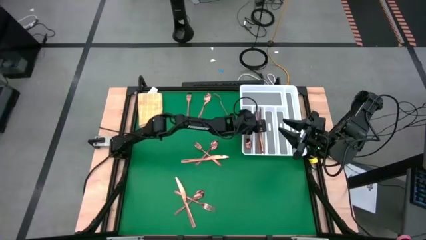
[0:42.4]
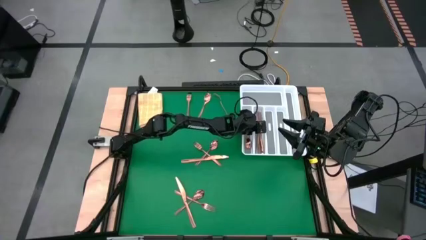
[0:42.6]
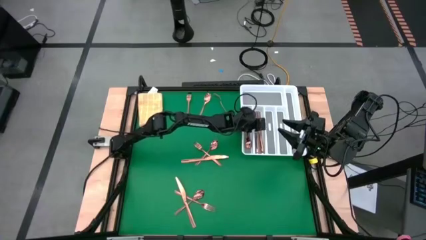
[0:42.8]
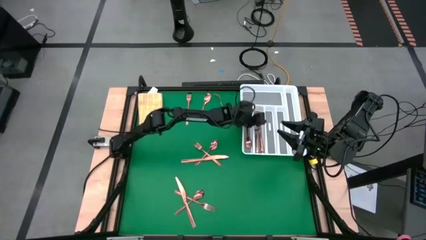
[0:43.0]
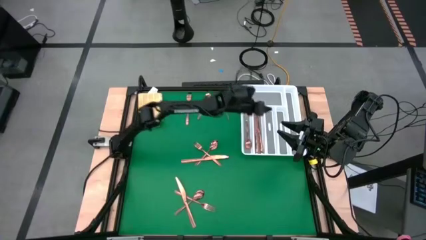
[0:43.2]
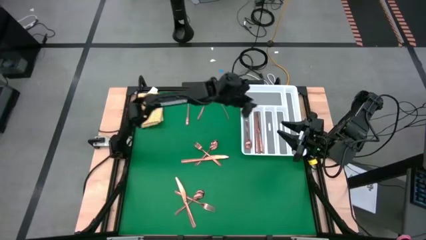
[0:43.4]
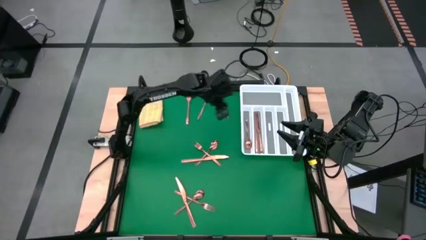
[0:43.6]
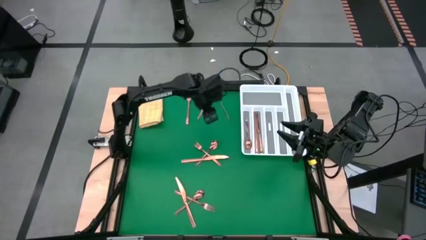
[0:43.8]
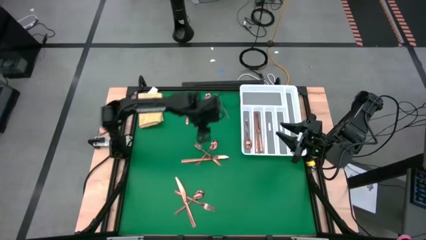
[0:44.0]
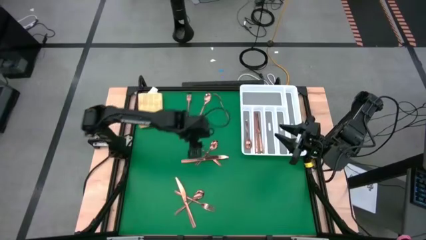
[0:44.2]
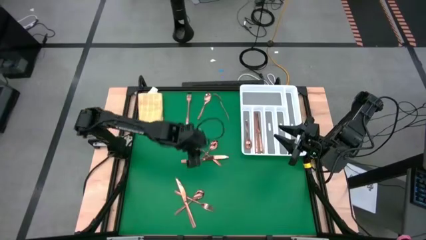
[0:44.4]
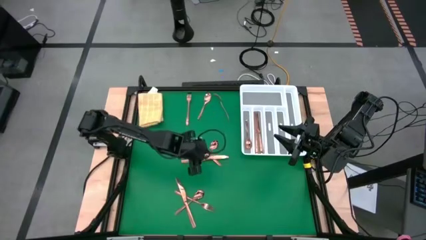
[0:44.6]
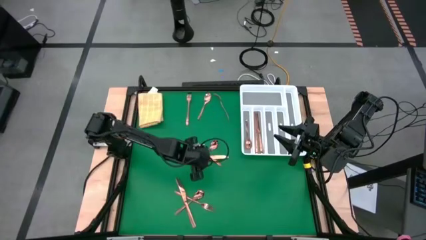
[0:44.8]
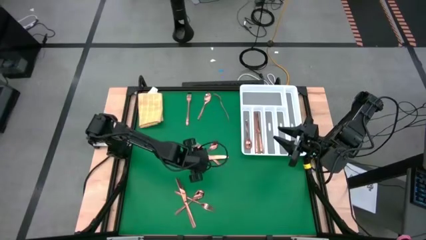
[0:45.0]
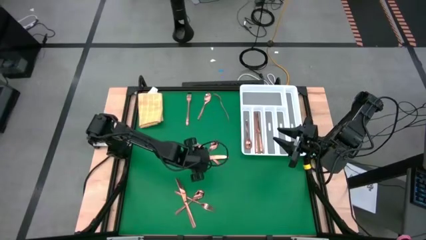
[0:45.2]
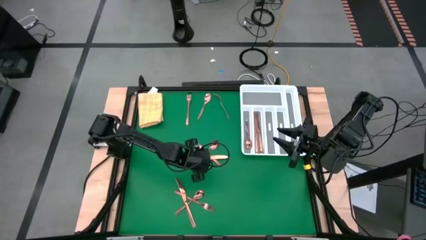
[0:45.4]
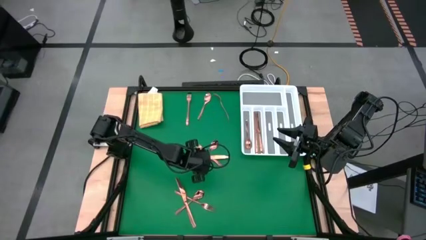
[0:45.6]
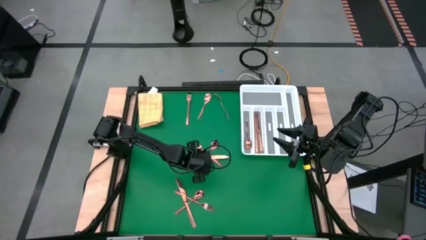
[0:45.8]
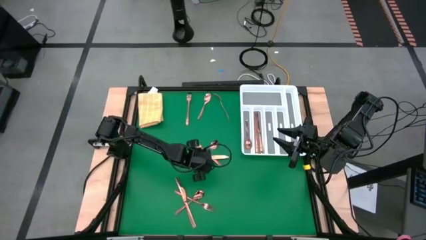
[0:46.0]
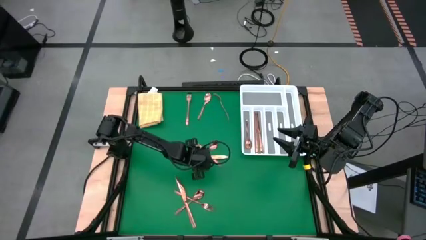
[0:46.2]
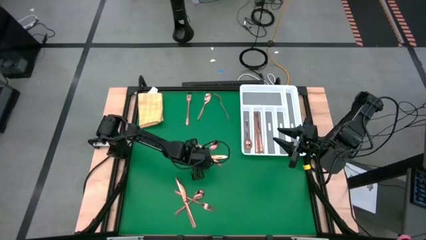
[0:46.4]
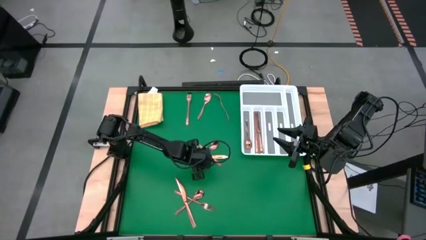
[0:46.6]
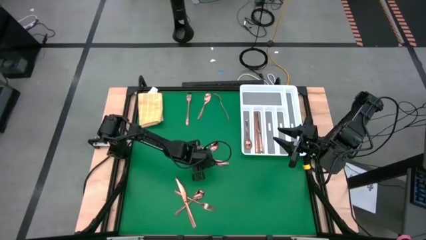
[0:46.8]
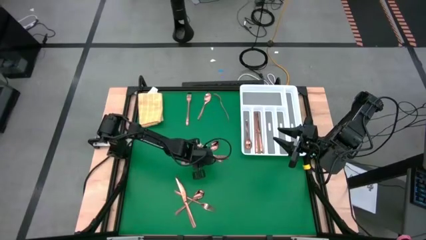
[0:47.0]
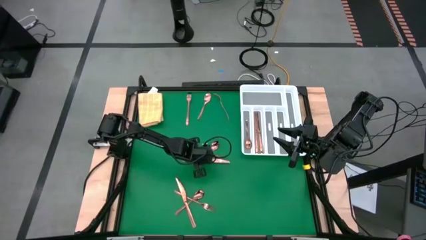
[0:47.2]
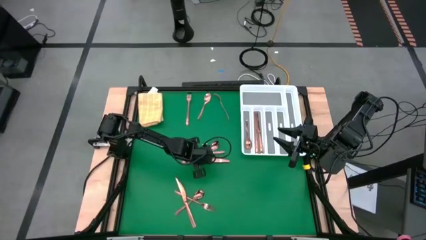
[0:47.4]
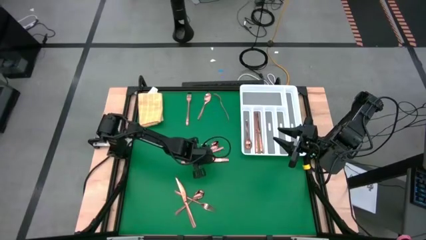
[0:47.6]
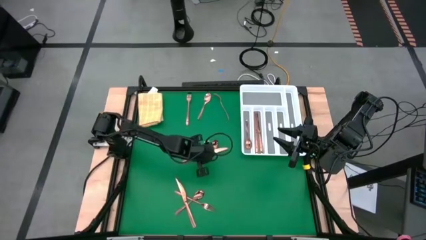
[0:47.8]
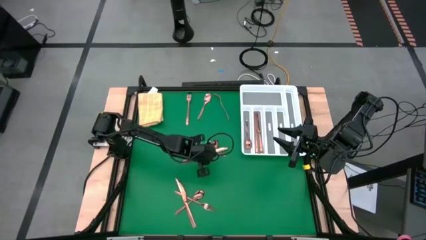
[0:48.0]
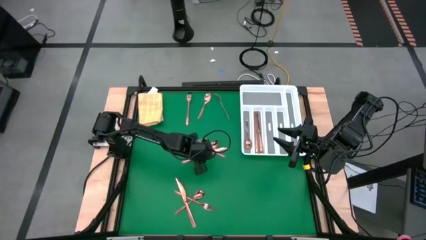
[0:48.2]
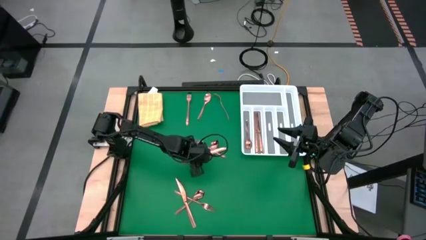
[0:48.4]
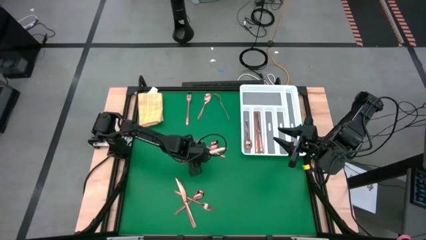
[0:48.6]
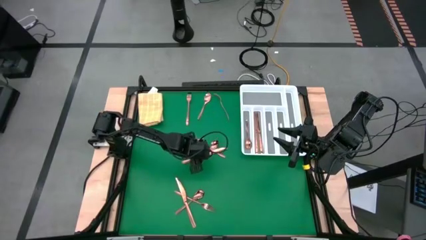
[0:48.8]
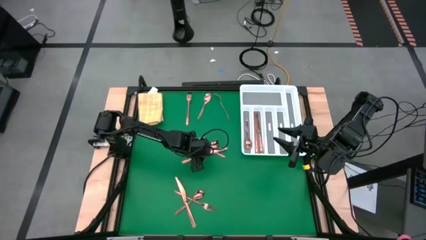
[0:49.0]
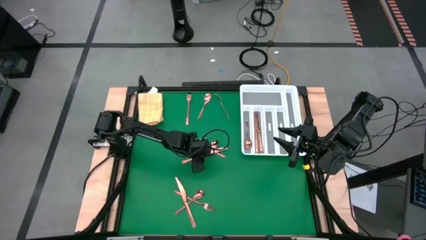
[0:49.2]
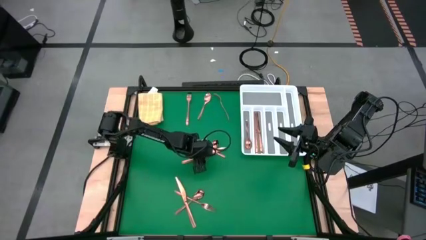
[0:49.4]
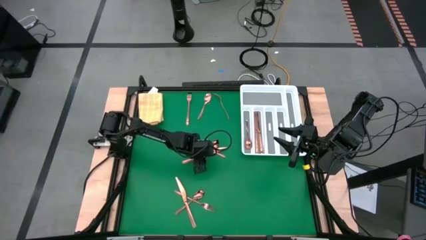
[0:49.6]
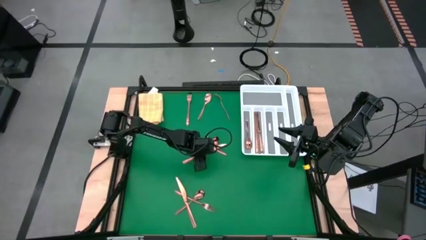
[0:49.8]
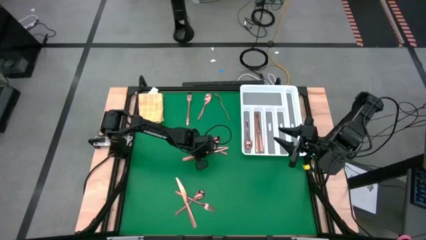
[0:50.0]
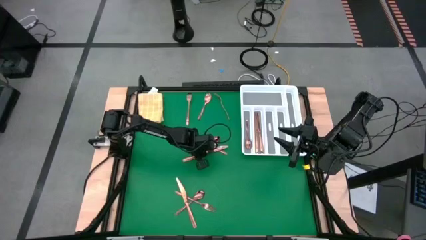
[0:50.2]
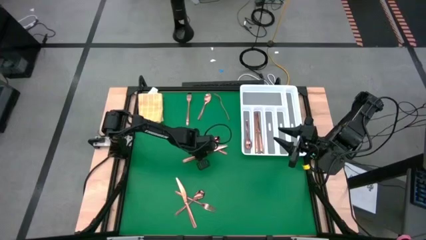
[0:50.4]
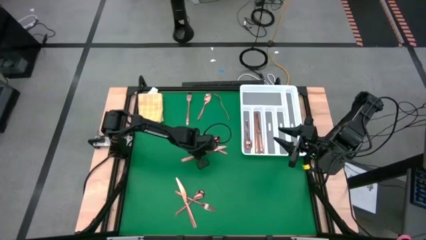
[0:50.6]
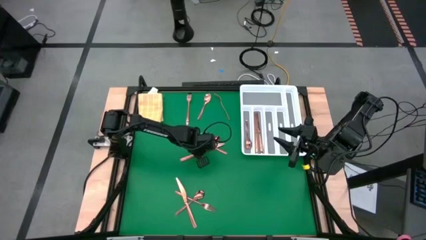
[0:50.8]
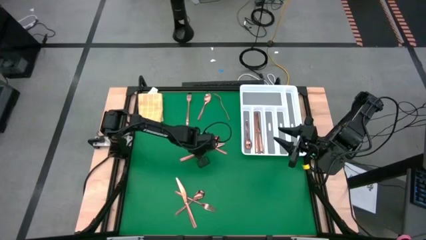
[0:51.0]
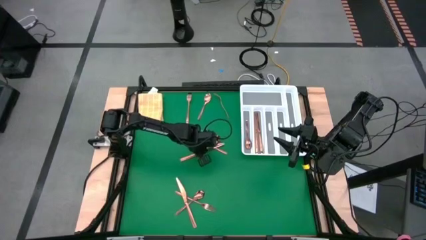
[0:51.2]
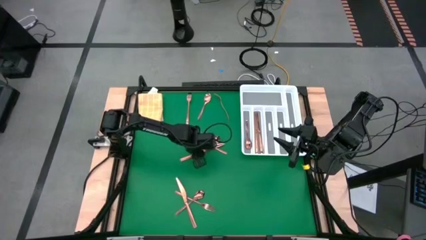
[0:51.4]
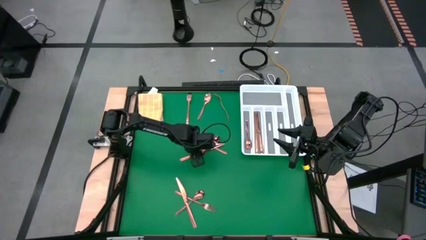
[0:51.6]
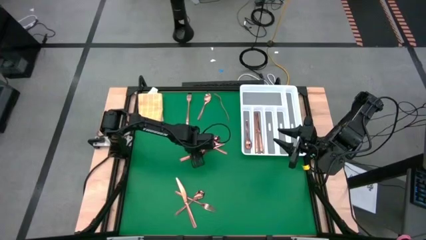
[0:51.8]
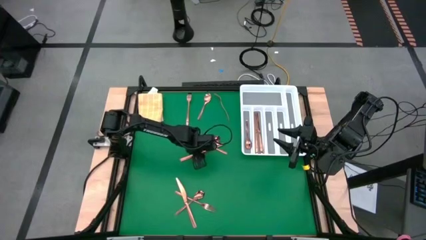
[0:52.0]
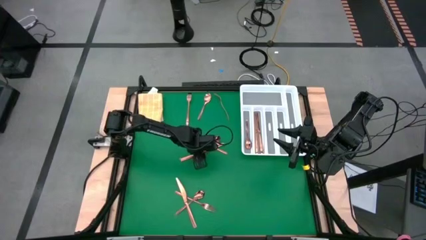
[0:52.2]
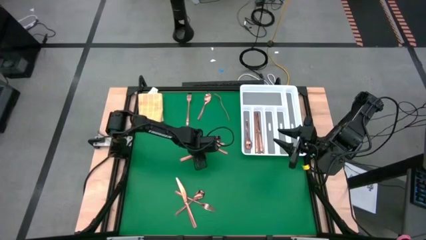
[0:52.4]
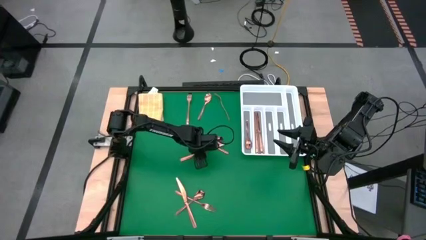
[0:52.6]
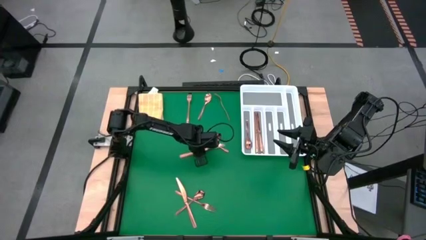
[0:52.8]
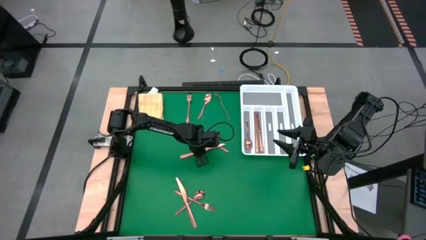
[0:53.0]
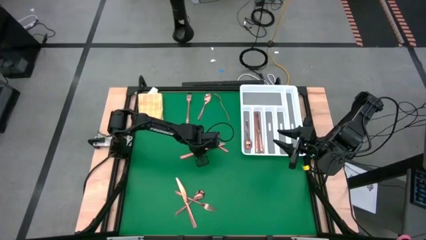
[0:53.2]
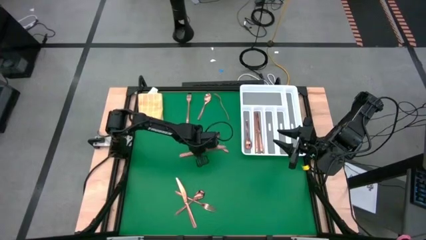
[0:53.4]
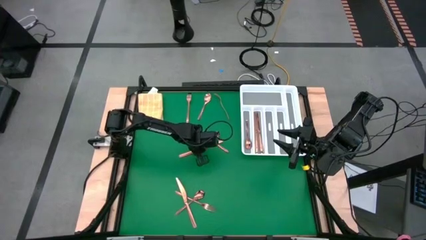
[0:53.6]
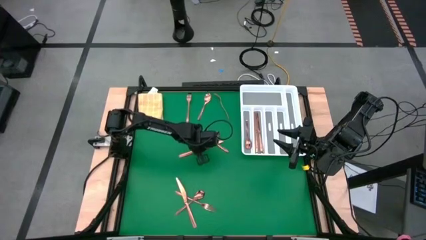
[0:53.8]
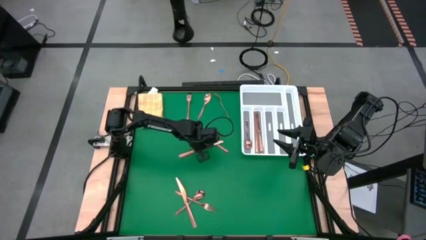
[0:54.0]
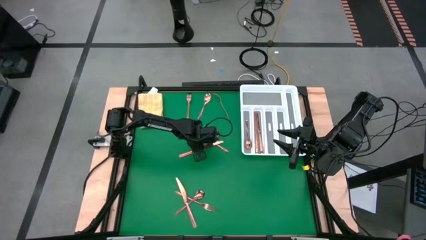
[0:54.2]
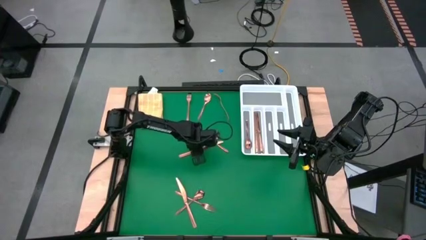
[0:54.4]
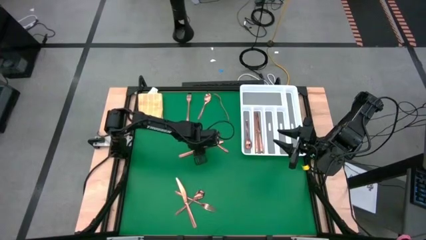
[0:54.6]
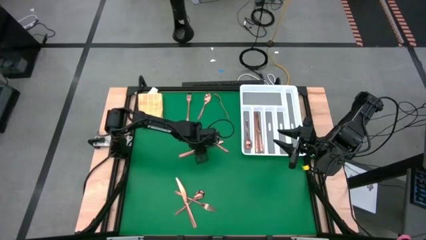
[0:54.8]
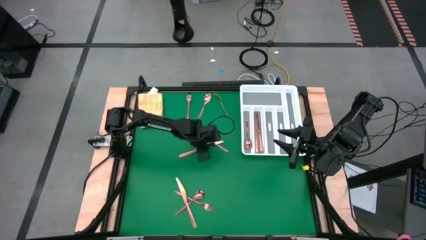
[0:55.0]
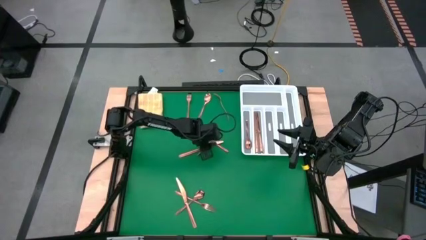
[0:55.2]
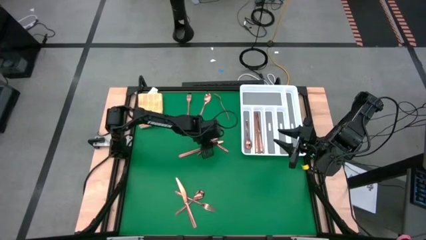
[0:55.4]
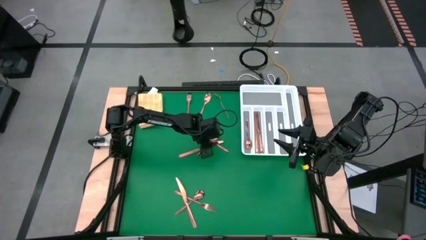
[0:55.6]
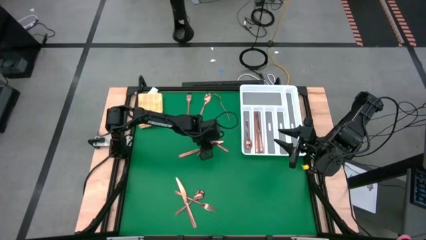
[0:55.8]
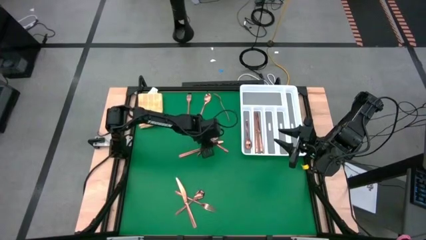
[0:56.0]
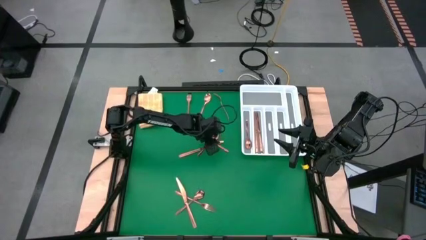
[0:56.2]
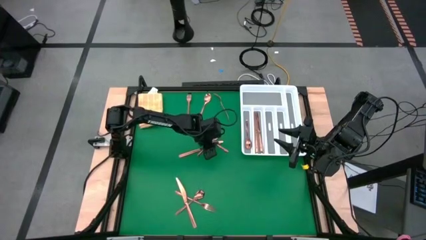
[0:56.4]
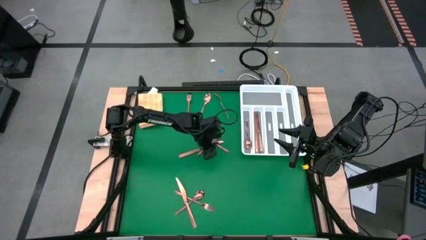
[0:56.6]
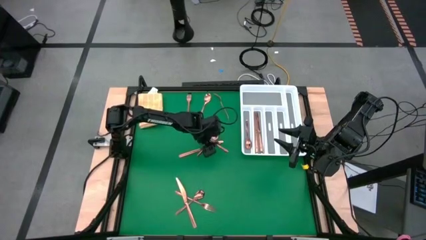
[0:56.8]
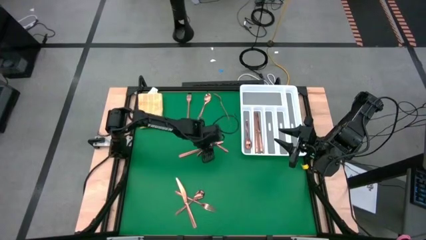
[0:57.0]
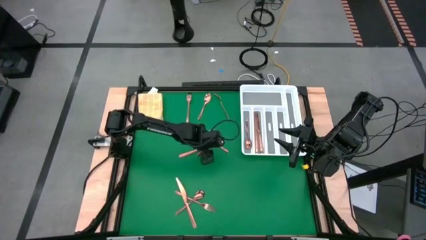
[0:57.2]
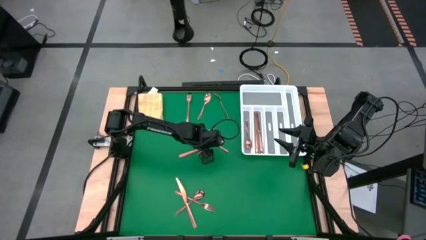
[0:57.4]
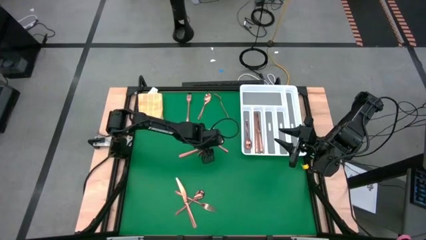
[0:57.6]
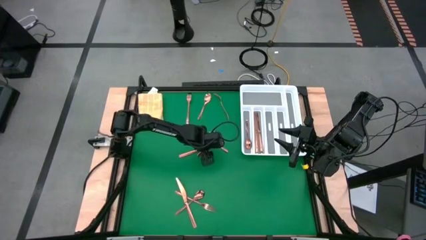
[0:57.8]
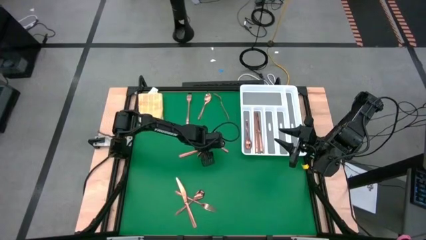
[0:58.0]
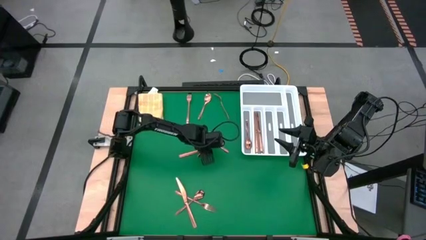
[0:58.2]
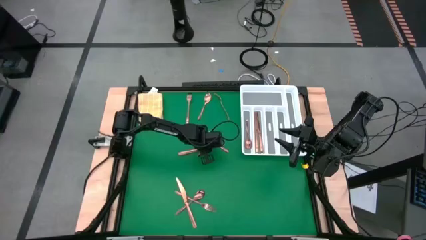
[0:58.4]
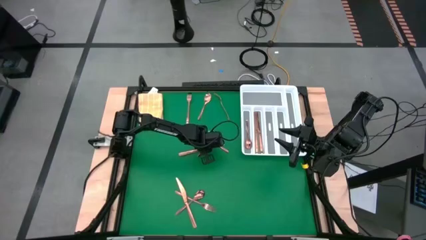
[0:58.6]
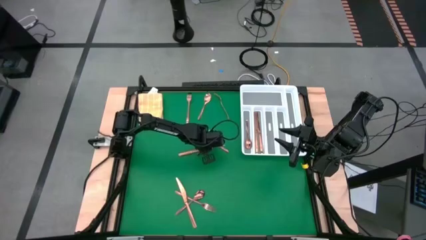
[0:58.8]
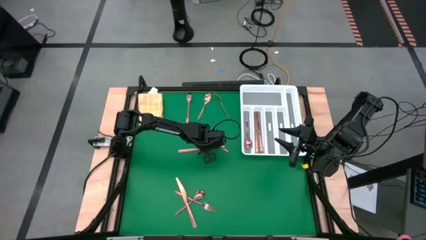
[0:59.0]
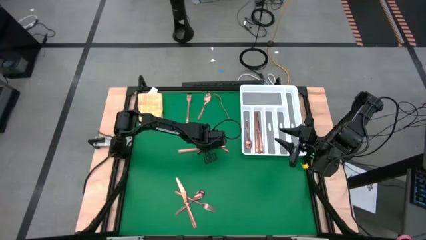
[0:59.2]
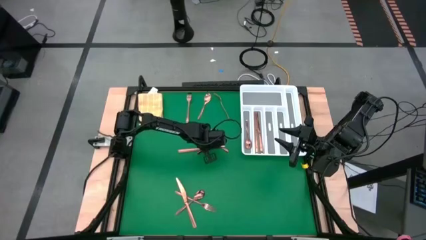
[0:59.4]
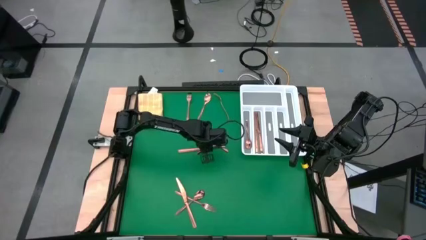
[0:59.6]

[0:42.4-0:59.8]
Task: Sort silverware
Put the top gold table knife into the silverware organizer
